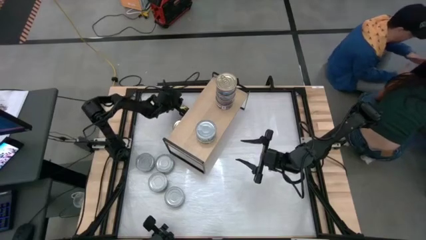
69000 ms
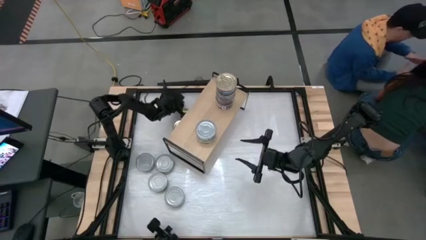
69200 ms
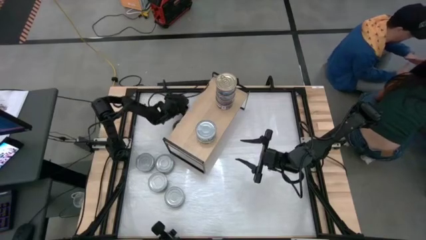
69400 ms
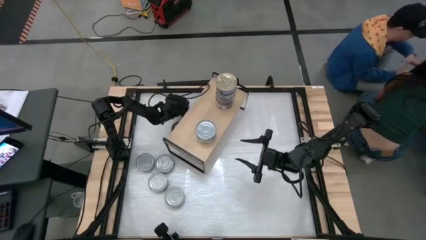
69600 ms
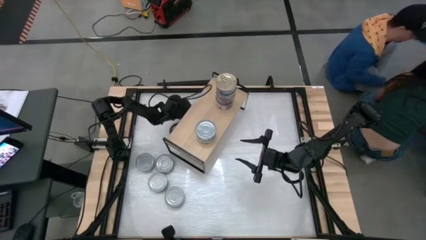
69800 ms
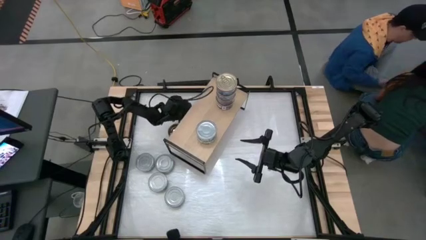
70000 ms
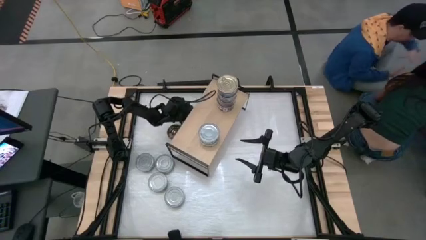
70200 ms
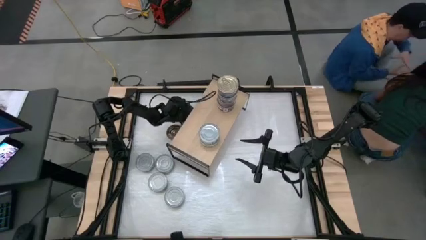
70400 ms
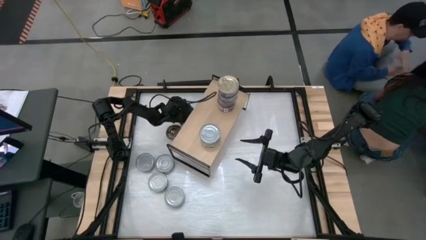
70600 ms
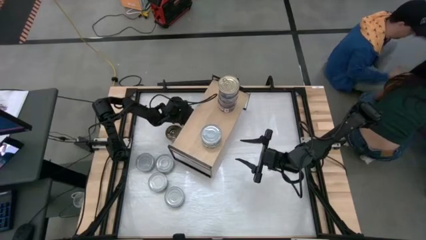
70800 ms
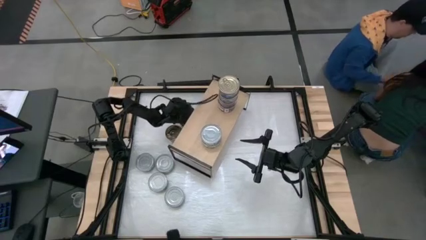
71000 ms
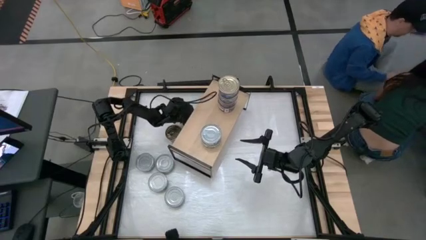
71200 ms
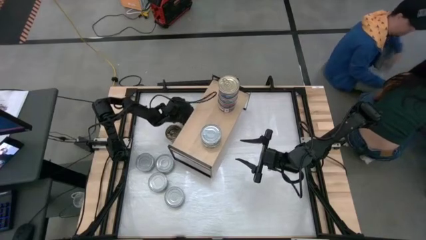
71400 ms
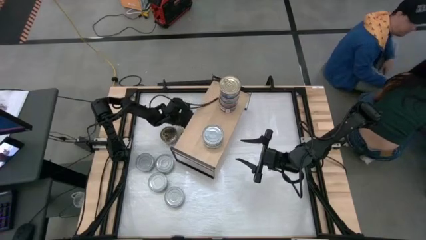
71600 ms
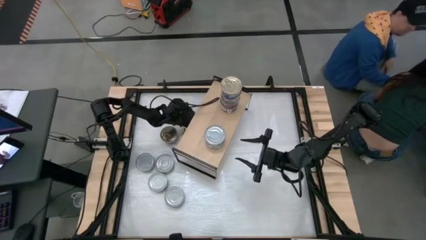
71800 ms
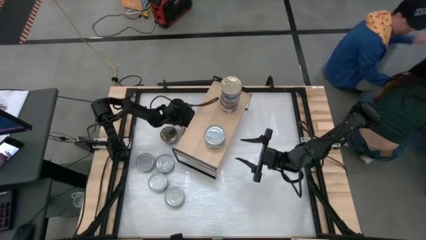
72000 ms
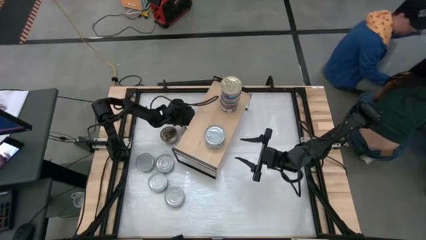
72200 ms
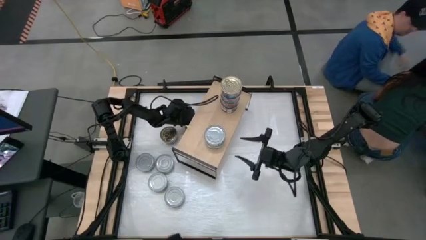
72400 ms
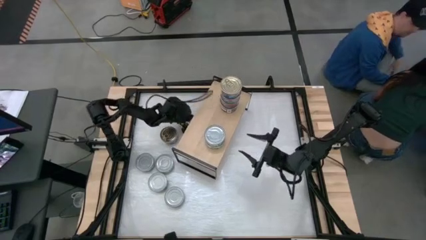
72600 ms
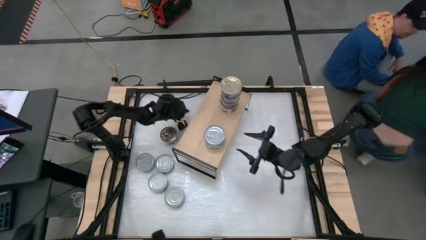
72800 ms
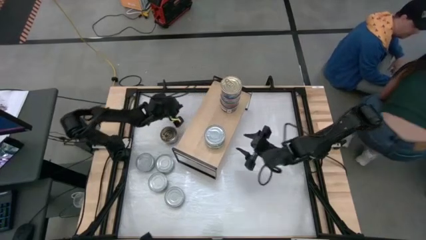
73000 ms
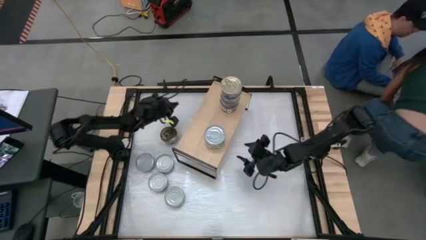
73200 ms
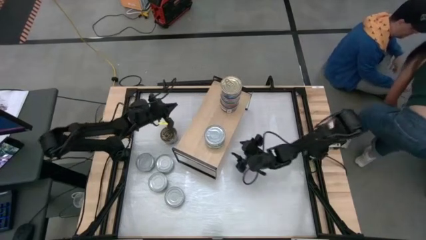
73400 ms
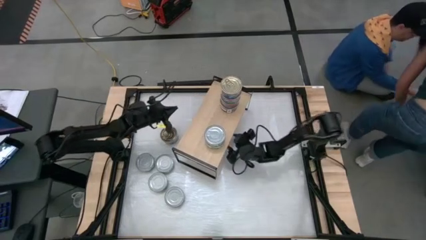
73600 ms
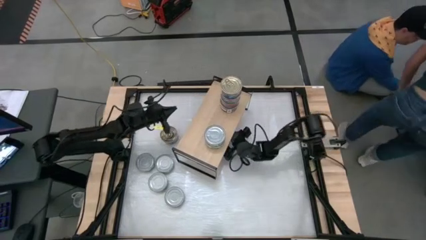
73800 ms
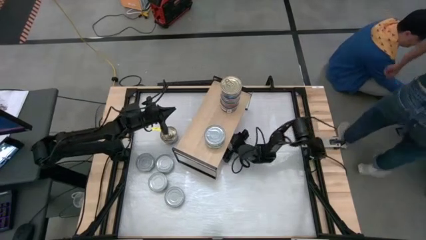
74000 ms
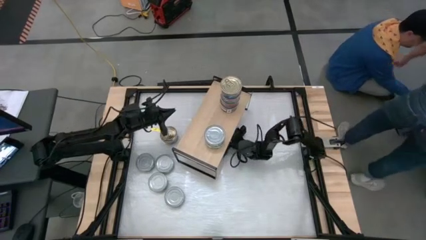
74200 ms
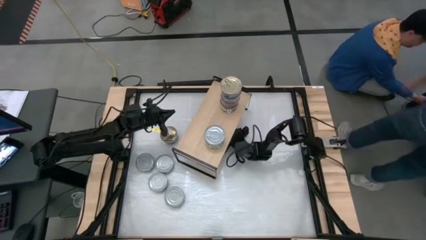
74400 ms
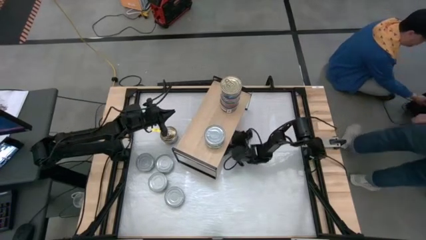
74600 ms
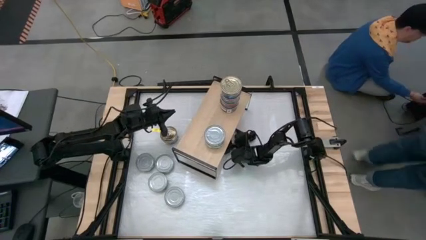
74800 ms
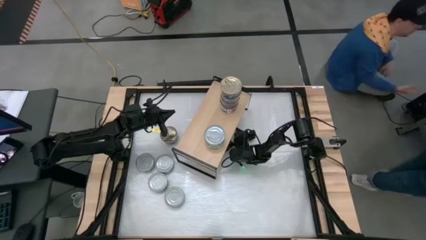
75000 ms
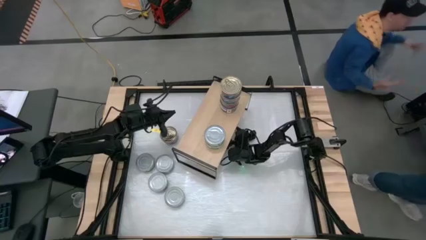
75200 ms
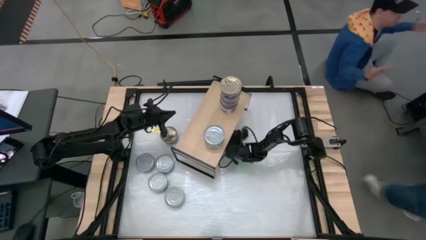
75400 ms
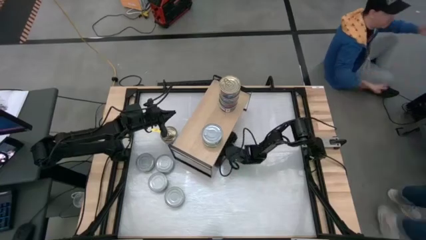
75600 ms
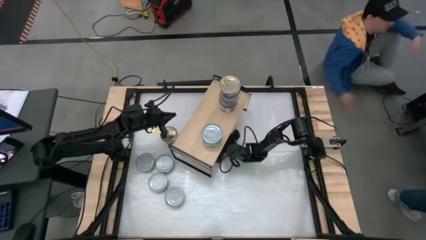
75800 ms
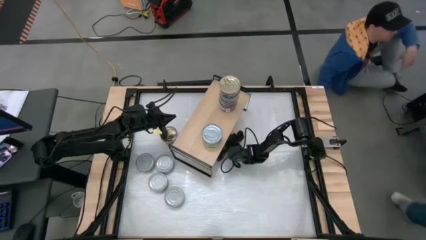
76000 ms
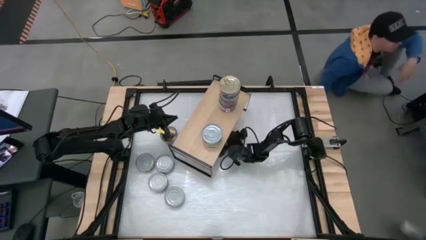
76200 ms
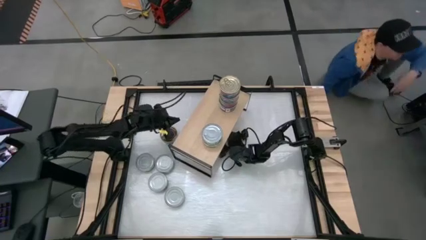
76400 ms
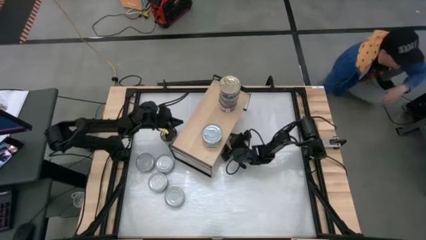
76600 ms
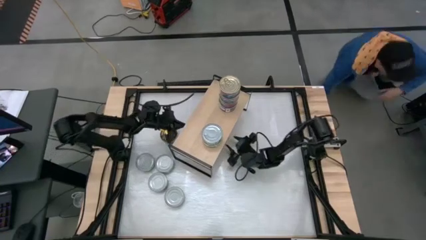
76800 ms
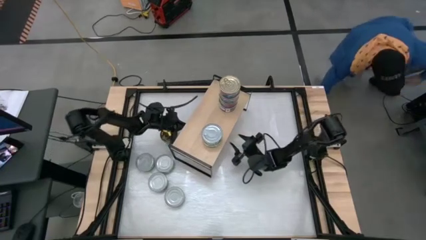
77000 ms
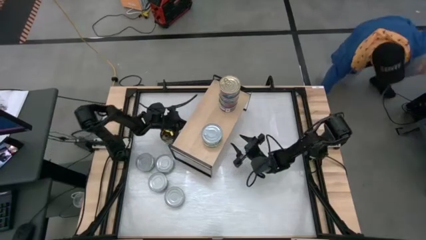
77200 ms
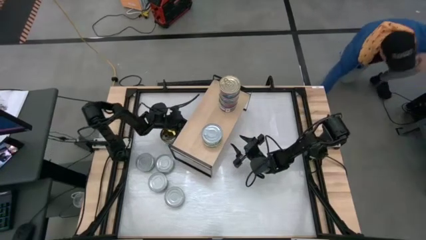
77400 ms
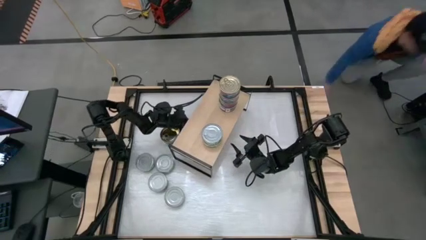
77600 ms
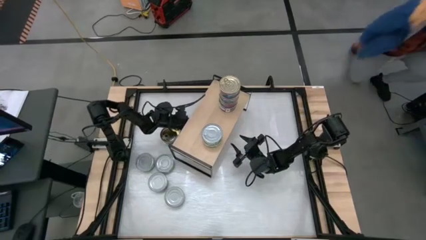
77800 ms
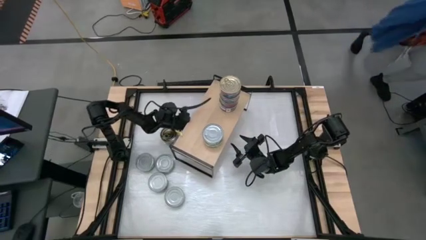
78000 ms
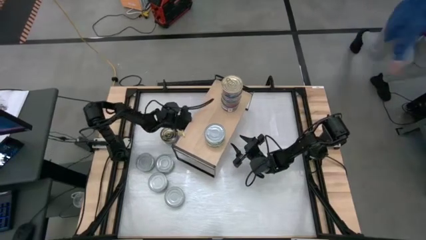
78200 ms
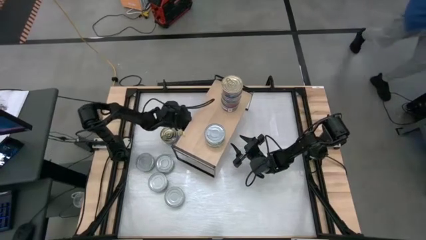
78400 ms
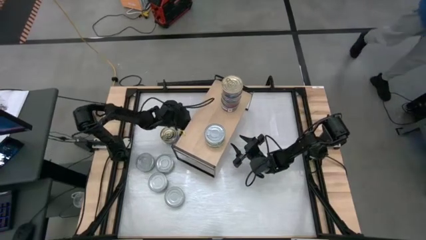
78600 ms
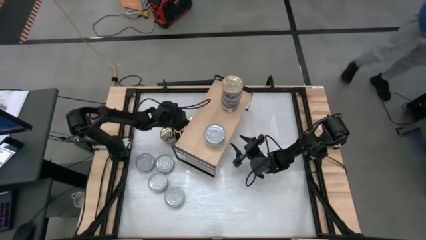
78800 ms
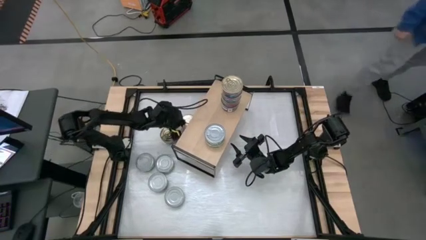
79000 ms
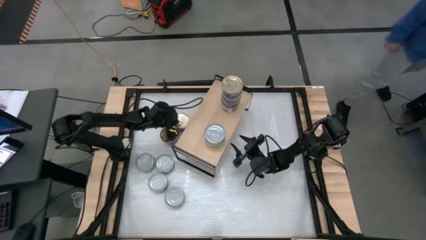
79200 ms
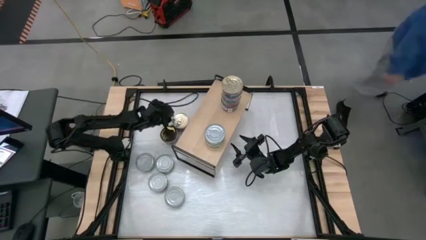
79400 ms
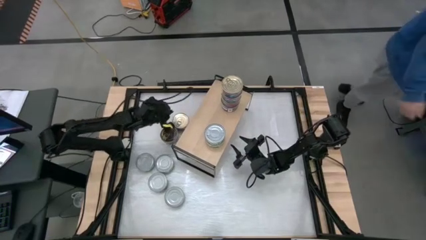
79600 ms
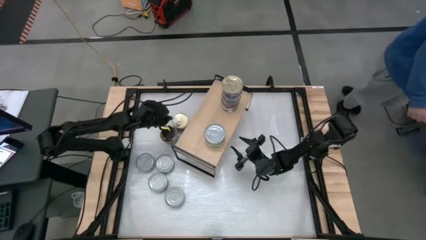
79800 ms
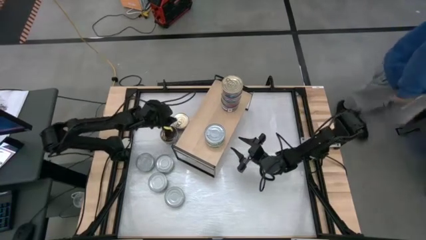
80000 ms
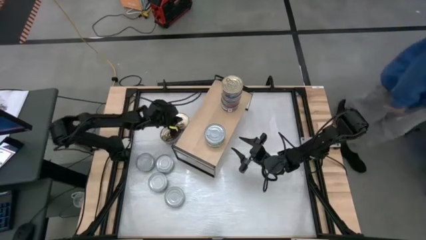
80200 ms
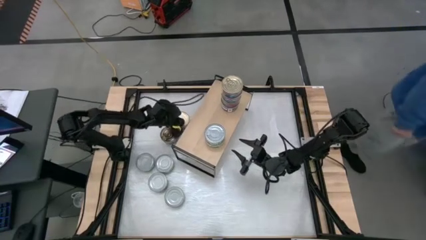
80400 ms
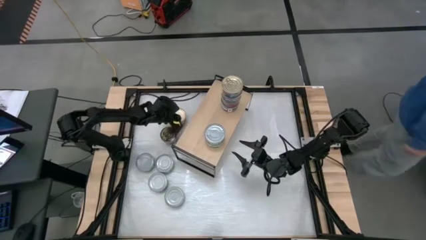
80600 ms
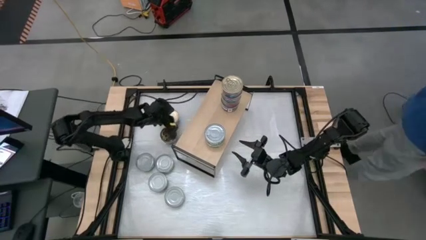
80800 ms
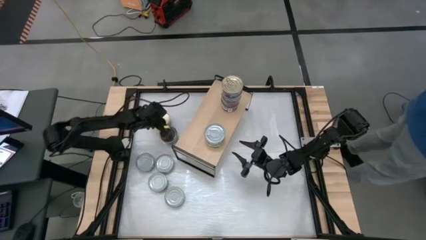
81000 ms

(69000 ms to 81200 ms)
Task: Stack canned seafood by type on shelf
Adjust the blue tuna can
